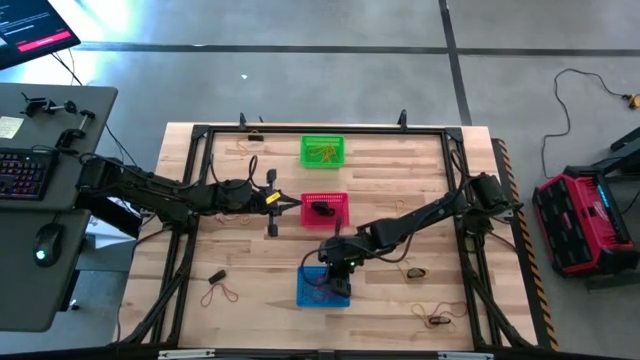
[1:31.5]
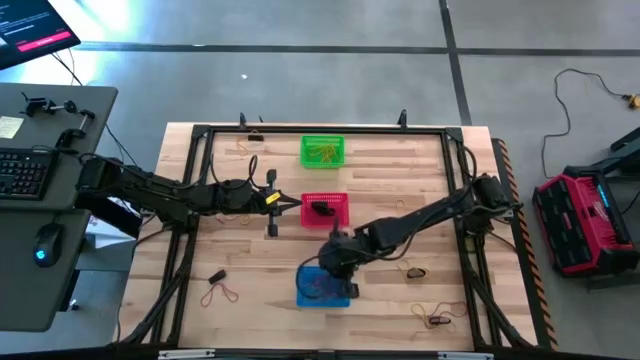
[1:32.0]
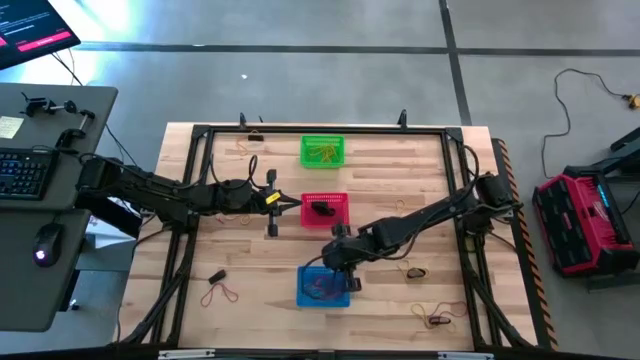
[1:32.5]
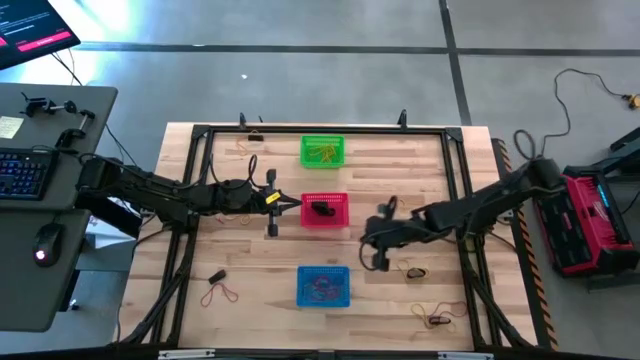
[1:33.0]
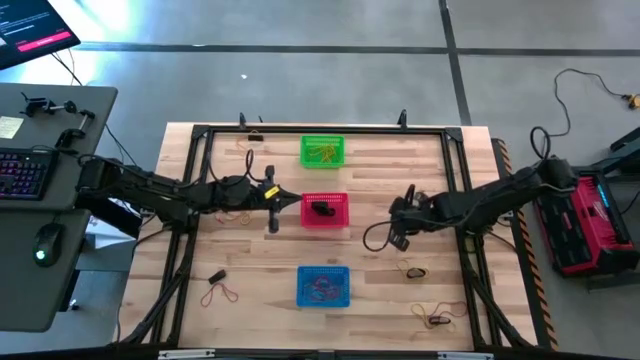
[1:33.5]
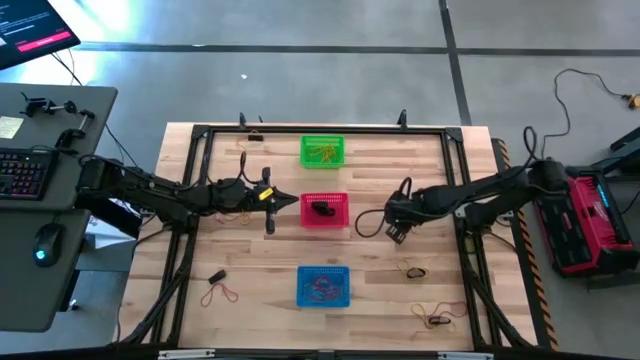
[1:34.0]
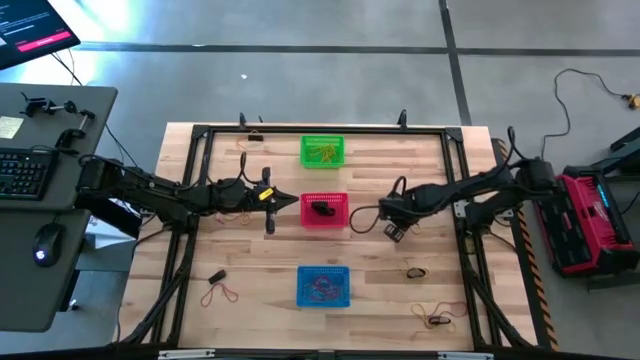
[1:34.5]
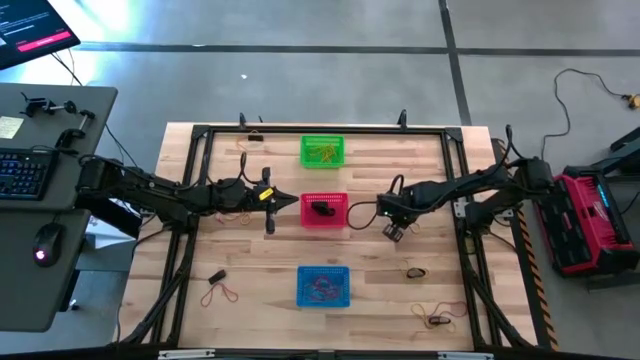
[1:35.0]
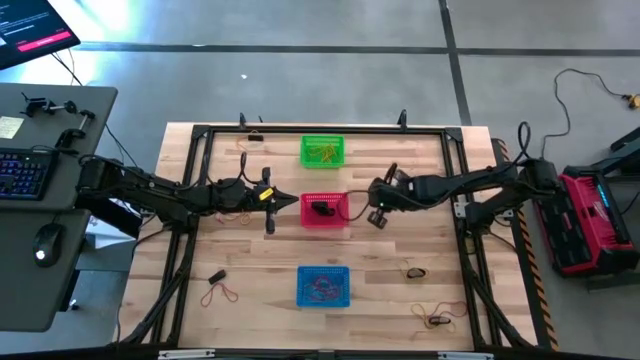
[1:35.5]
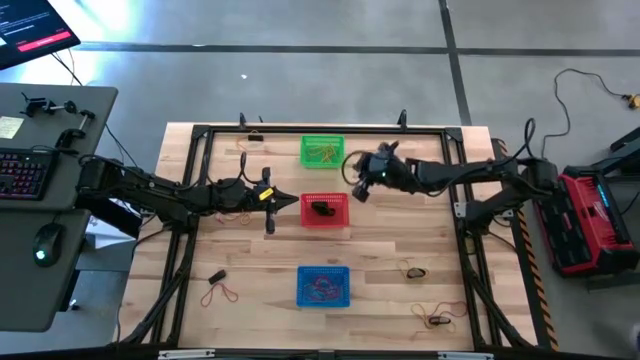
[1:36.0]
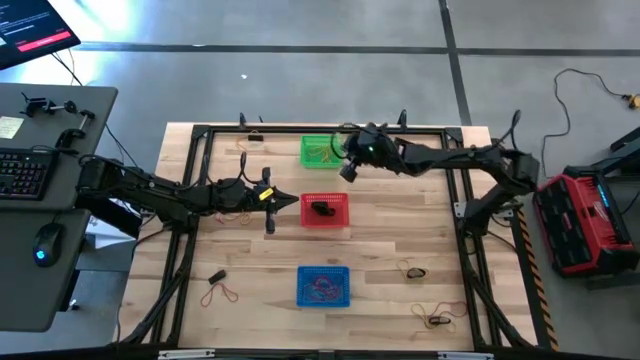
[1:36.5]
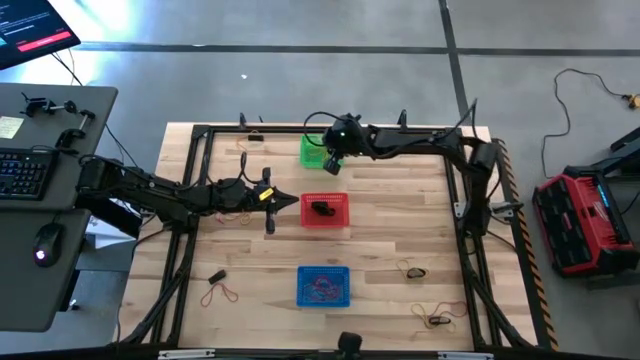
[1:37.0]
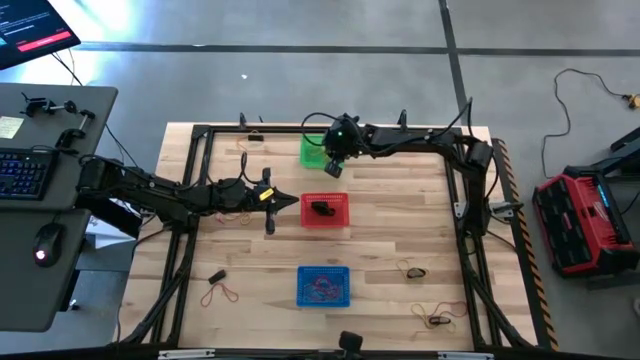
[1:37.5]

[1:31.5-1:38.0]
Task: Sort rubber bands into baskets
Put the yellow rubber band into the green bin

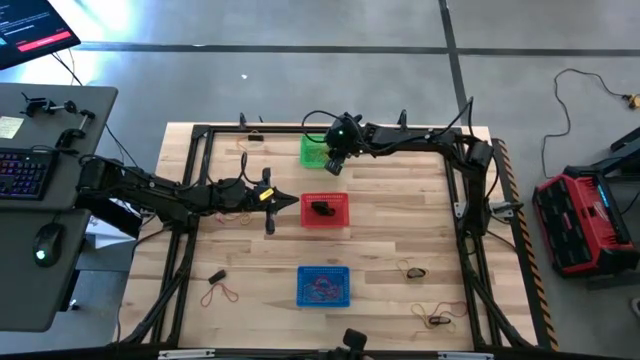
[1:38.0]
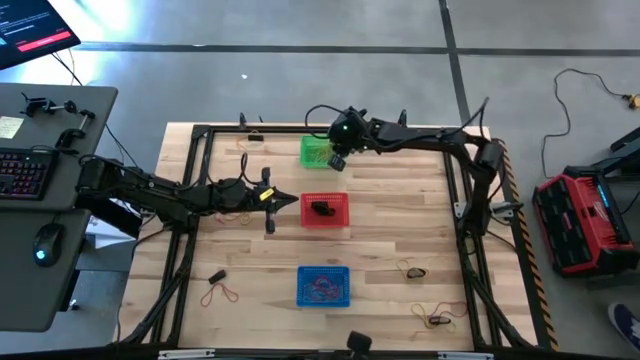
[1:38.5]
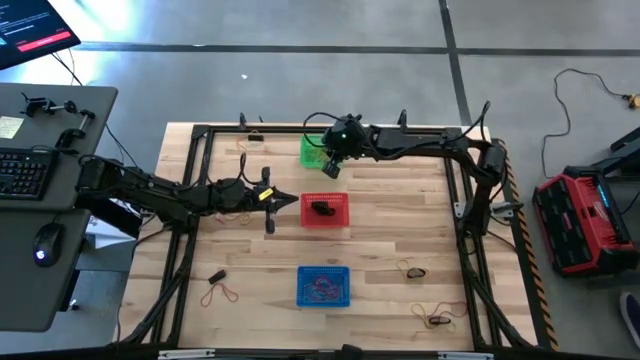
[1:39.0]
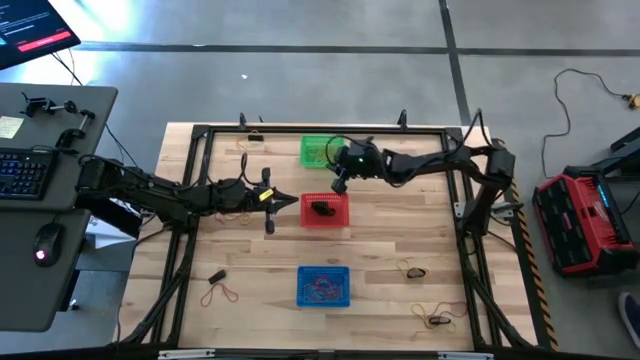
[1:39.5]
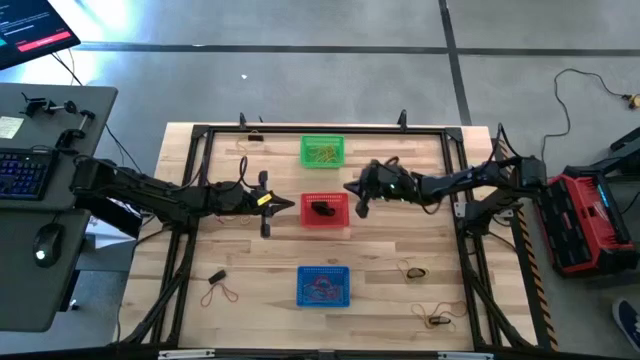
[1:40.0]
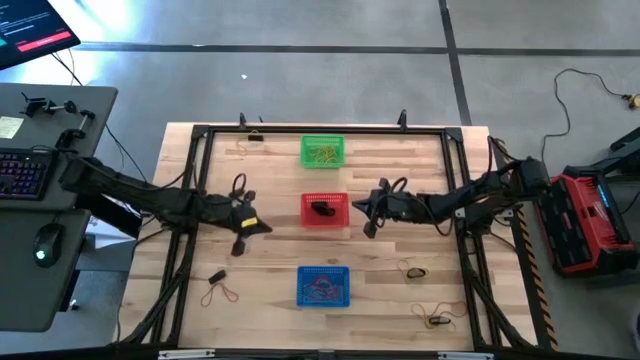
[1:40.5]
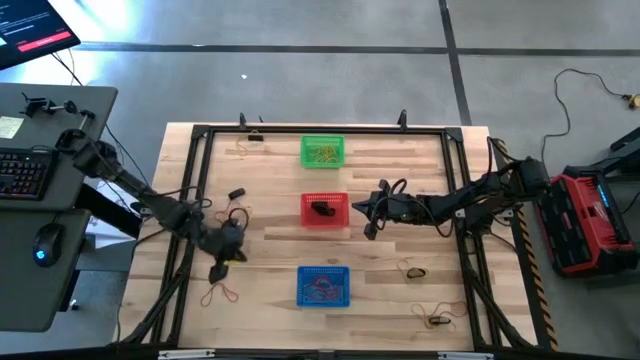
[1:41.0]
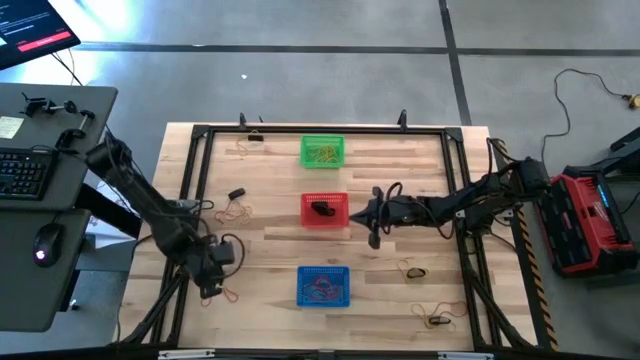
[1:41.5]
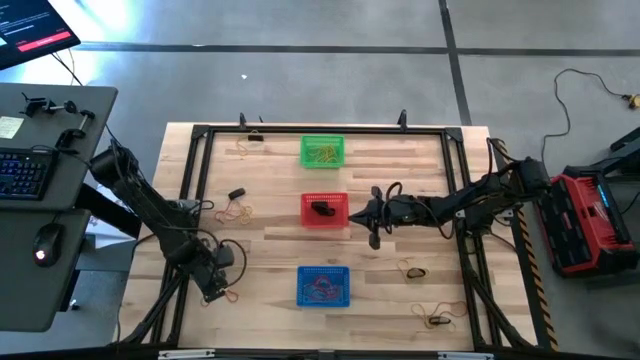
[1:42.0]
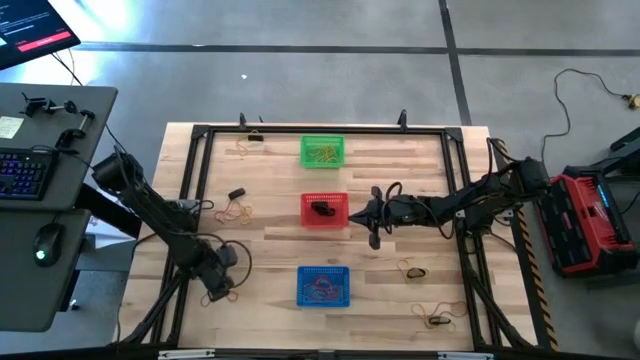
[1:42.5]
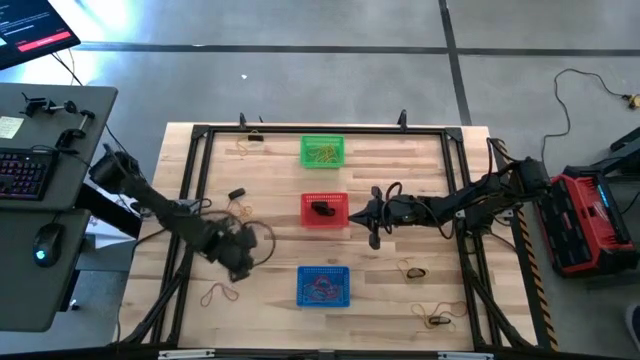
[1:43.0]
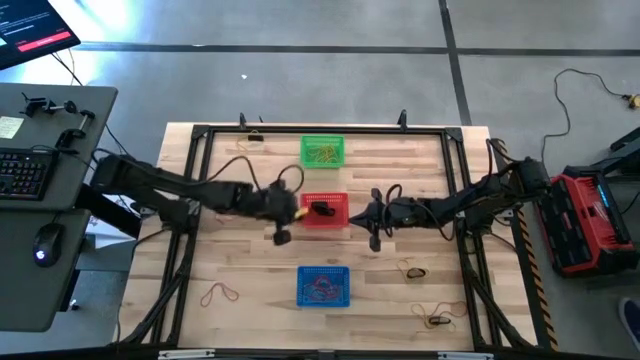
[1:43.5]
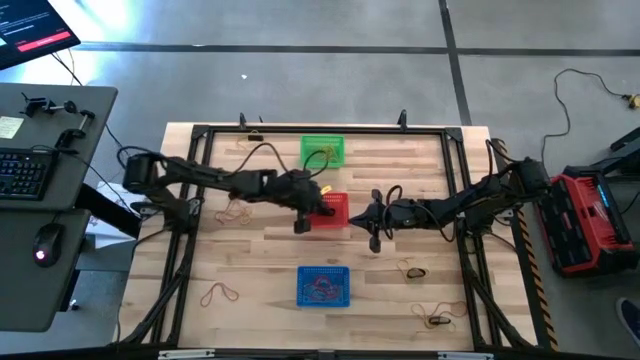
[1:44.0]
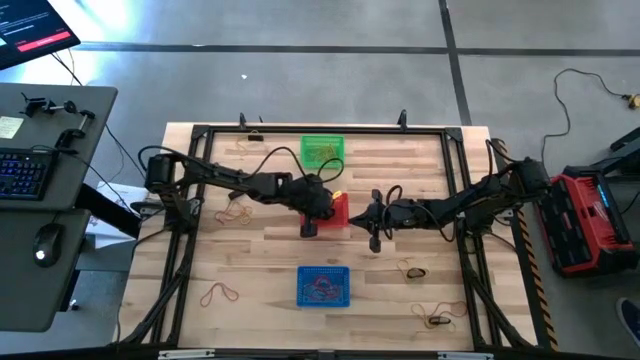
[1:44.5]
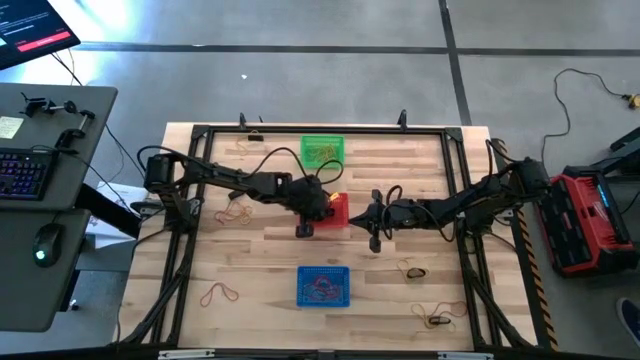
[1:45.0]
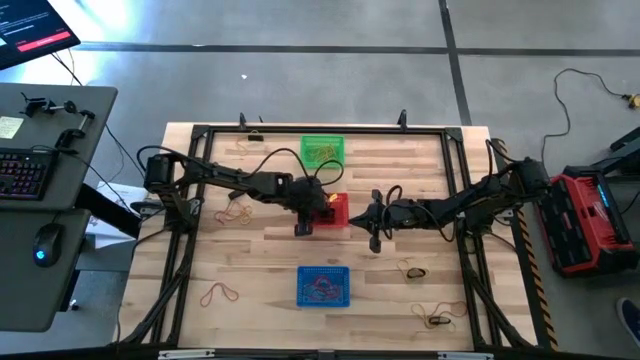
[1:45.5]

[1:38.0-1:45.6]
Put the black rubber band into the red bin

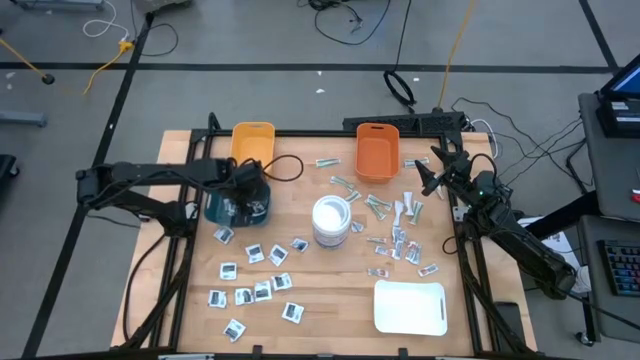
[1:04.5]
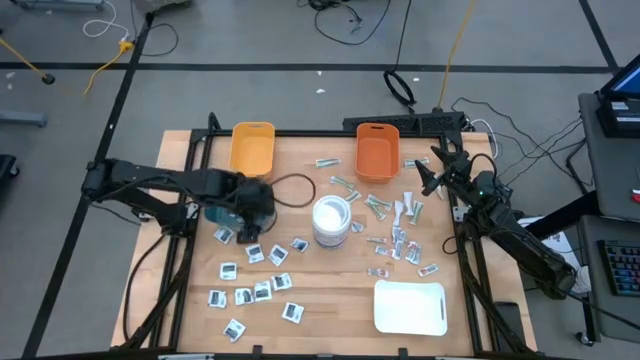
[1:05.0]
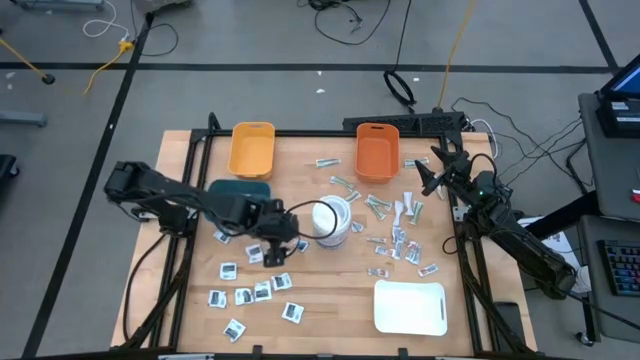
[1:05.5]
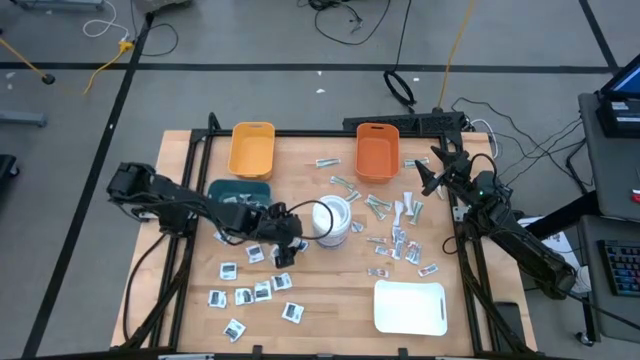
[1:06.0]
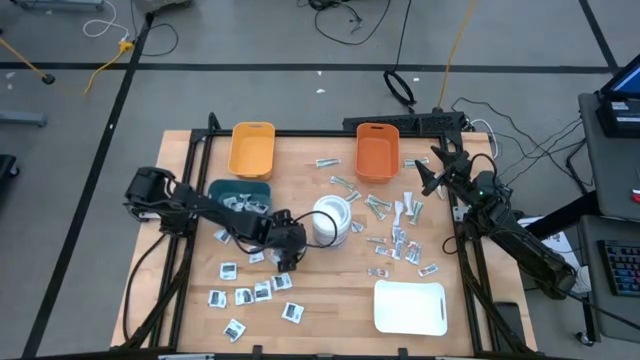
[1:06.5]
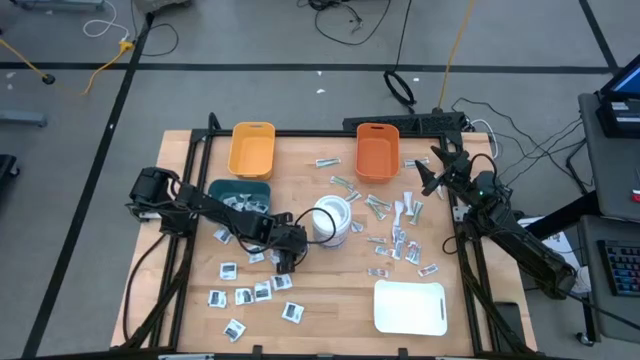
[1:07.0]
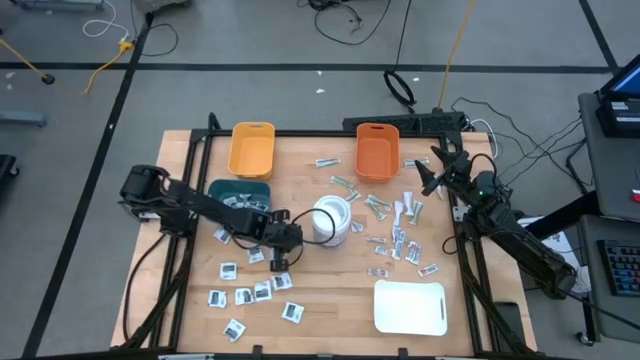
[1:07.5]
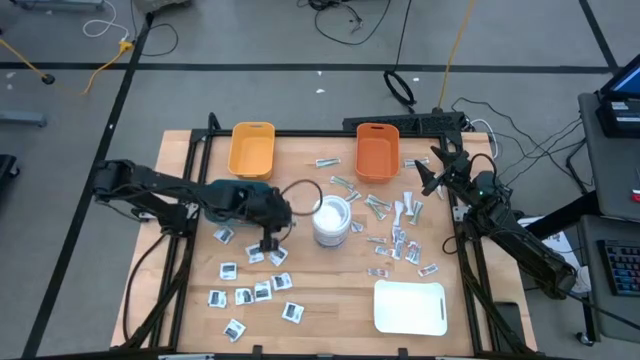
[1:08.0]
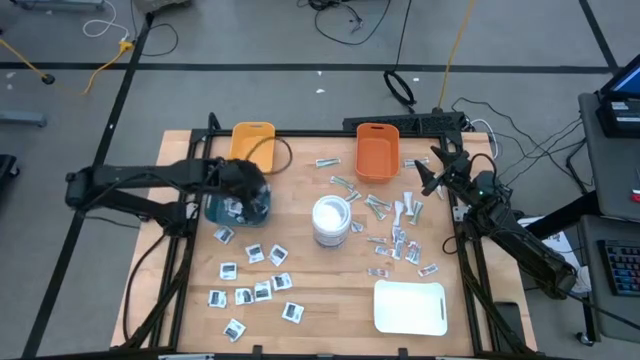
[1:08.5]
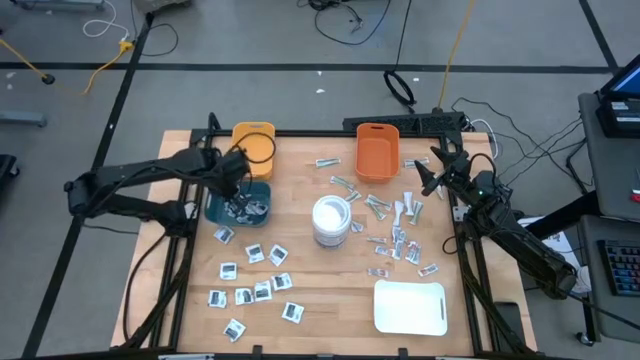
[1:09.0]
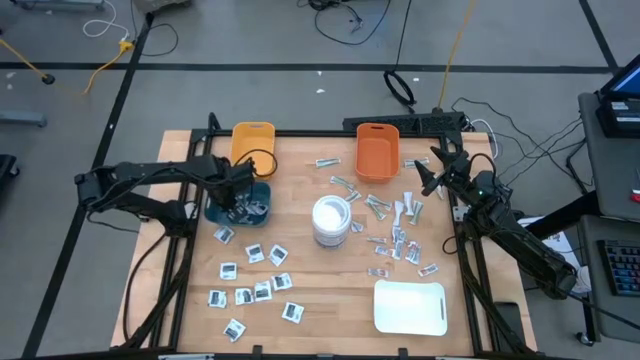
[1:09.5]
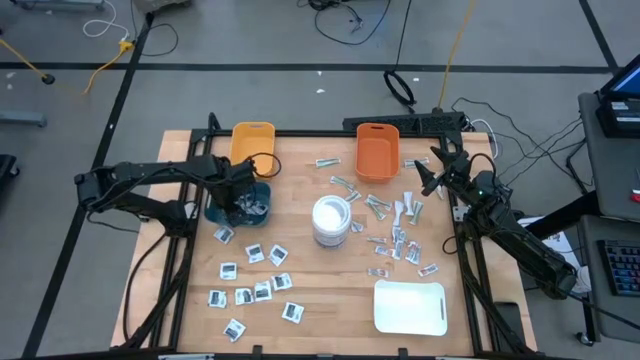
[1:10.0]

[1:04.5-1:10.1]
Task: Pick & Place First Aid Supplies
Put the blue pad into the blue bin

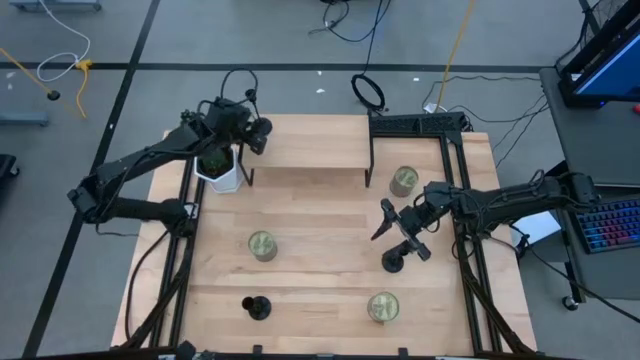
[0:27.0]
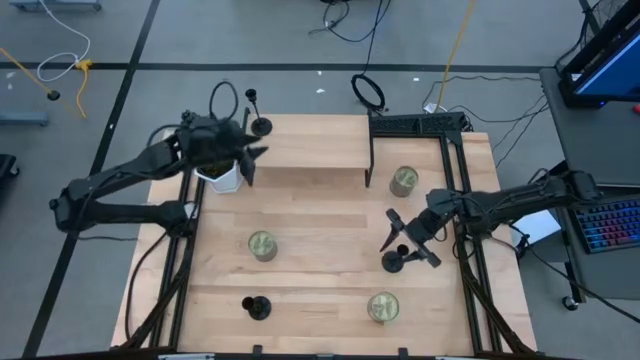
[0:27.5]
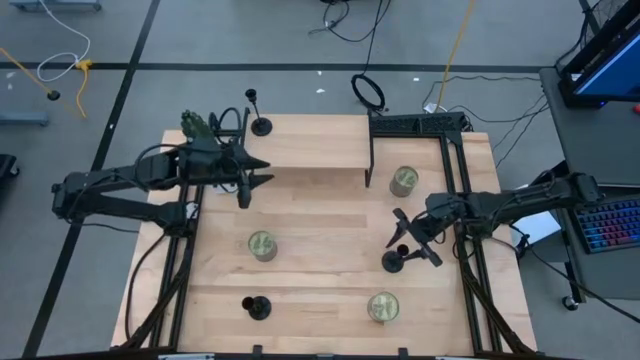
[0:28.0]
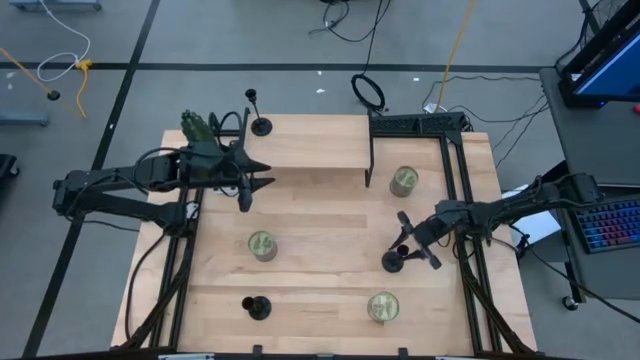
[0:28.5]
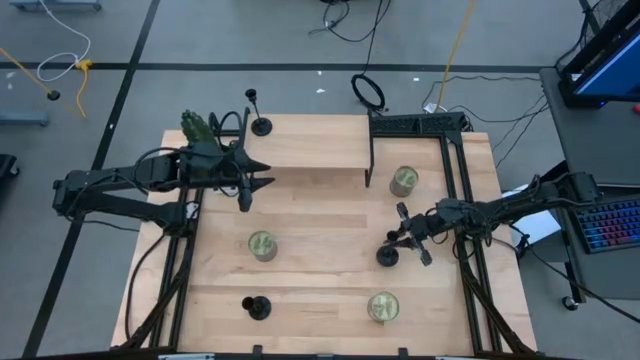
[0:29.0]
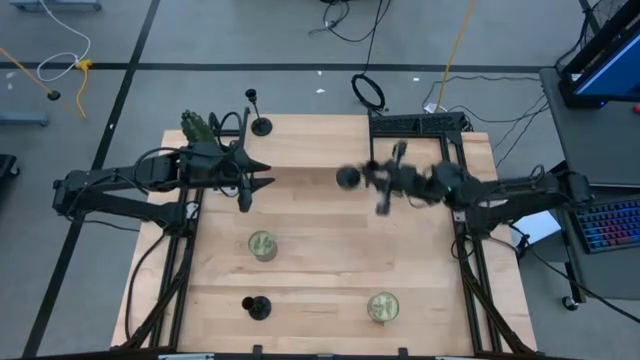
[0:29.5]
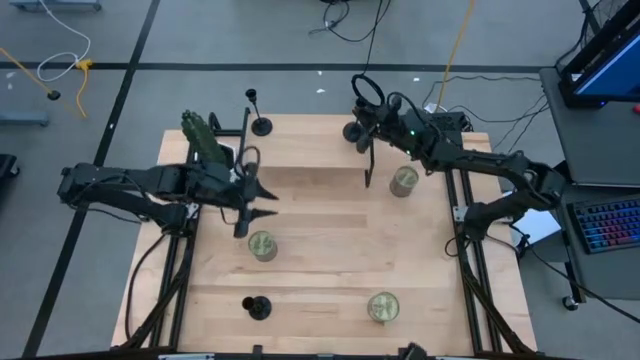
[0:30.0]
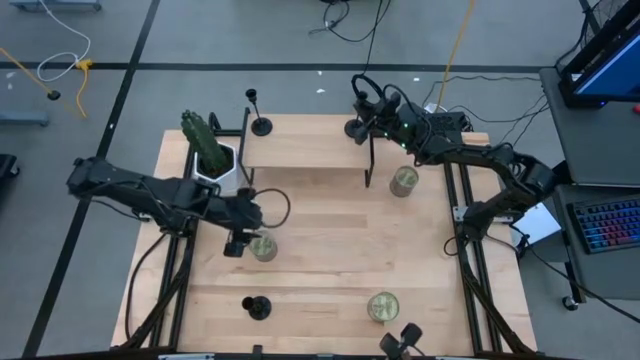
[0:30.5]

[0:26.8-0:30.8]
Task: Pick & Place candle stick holders
Put the right black candle holder on the shelf
